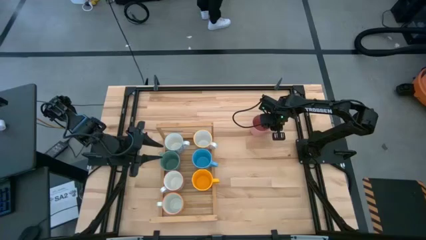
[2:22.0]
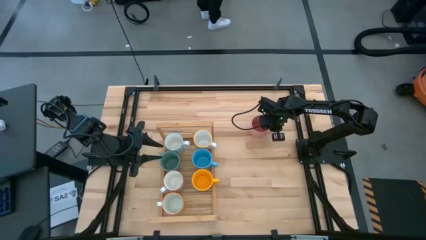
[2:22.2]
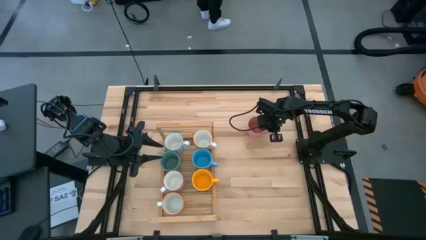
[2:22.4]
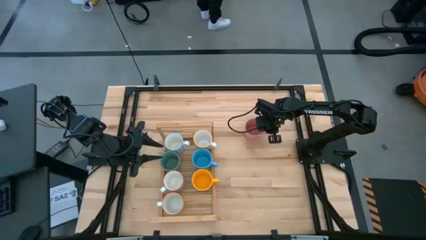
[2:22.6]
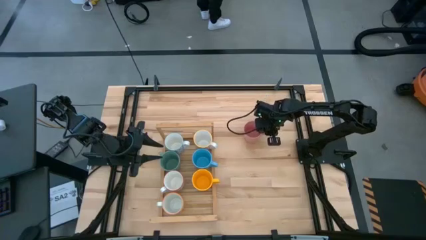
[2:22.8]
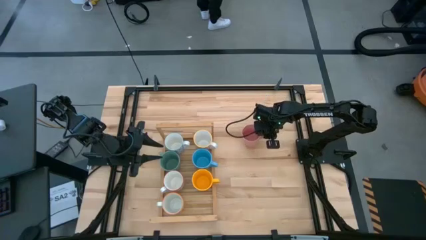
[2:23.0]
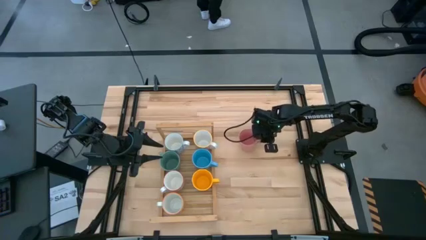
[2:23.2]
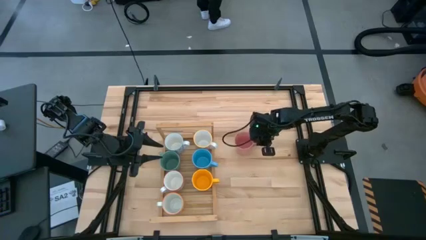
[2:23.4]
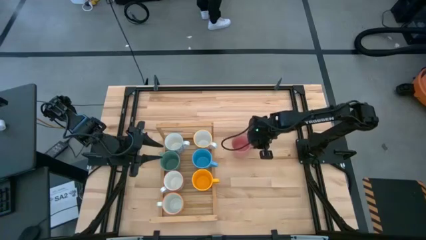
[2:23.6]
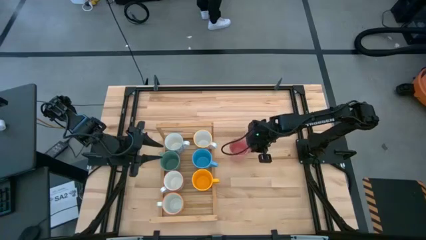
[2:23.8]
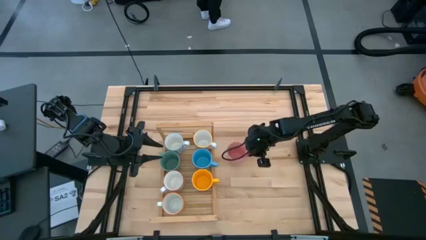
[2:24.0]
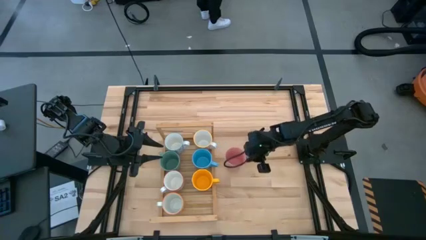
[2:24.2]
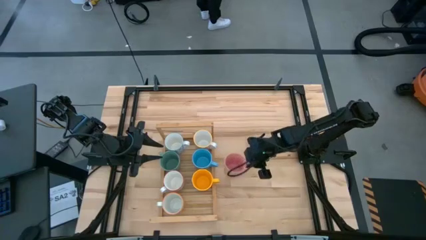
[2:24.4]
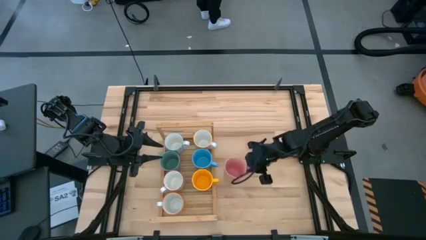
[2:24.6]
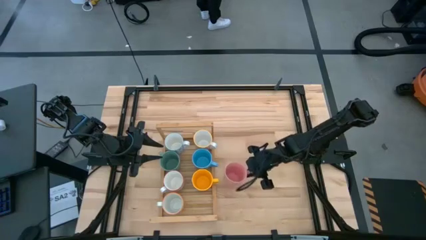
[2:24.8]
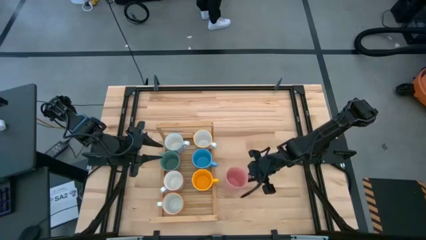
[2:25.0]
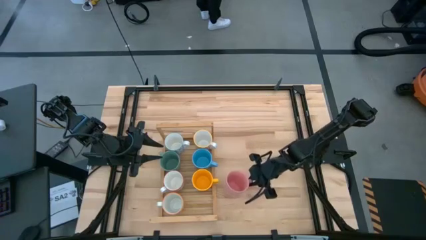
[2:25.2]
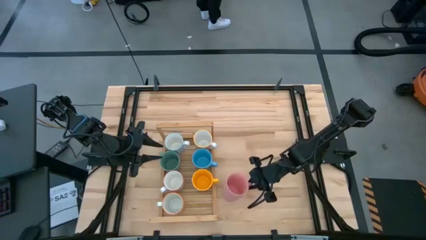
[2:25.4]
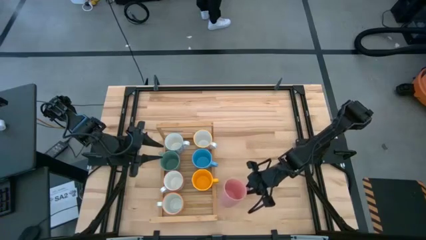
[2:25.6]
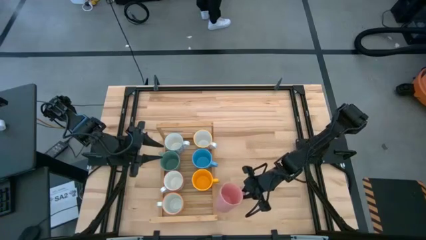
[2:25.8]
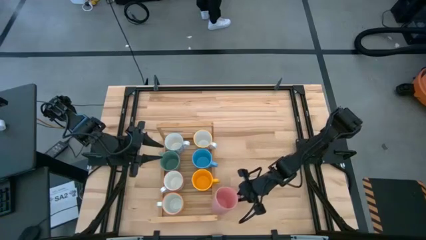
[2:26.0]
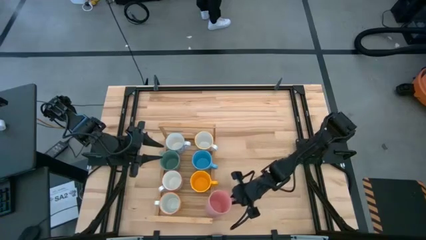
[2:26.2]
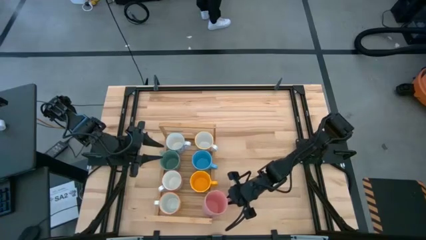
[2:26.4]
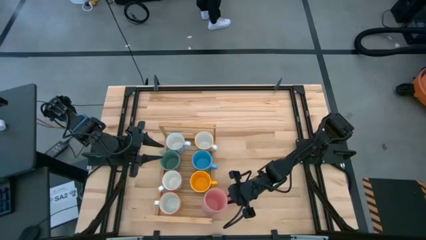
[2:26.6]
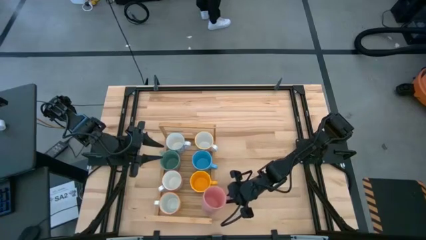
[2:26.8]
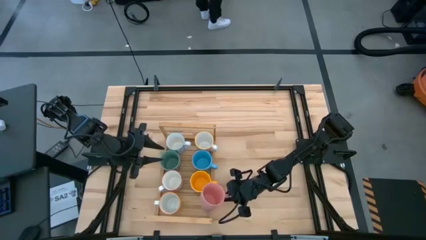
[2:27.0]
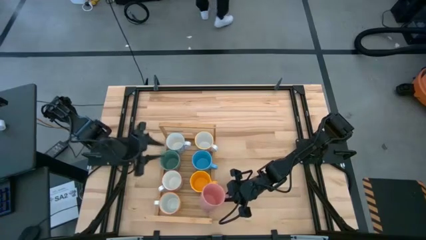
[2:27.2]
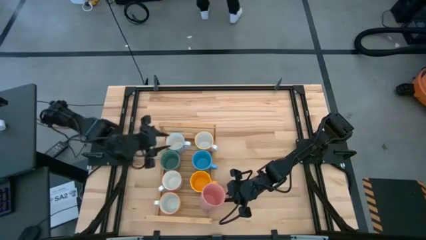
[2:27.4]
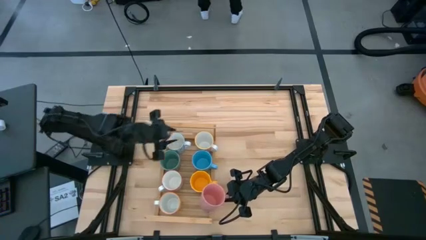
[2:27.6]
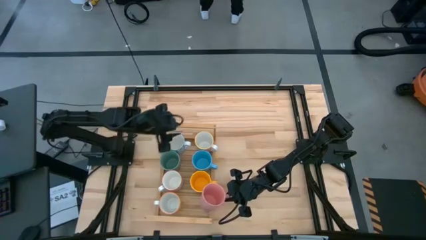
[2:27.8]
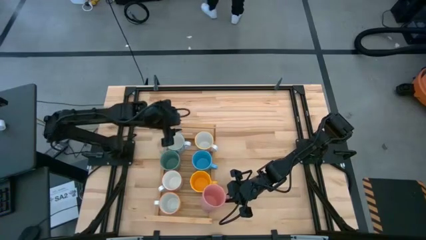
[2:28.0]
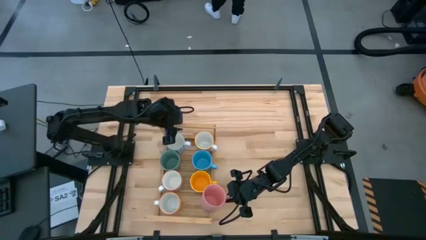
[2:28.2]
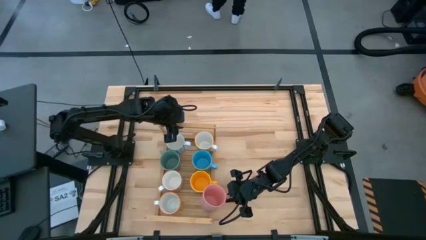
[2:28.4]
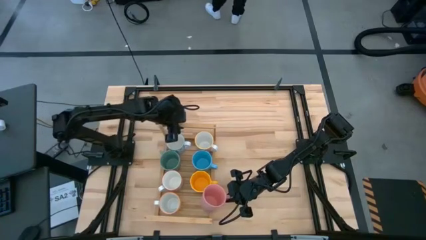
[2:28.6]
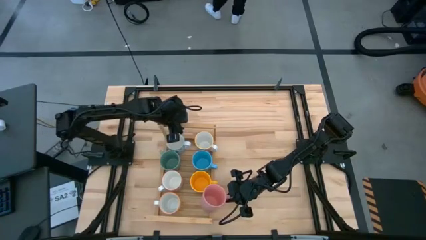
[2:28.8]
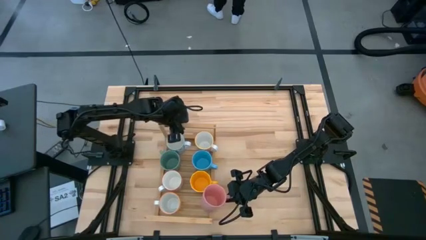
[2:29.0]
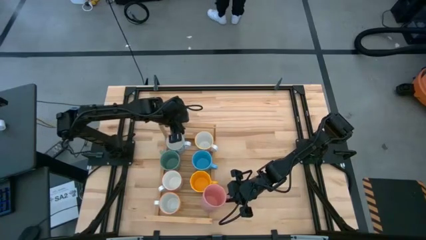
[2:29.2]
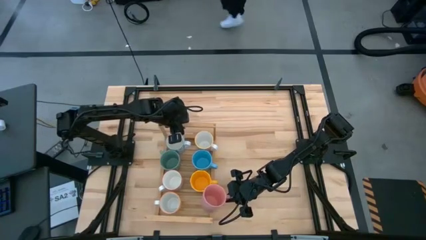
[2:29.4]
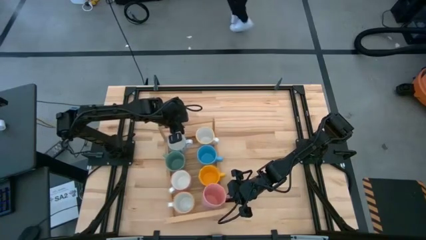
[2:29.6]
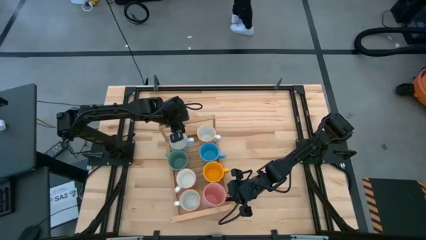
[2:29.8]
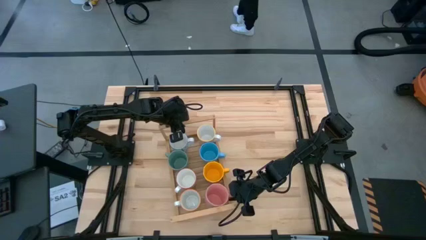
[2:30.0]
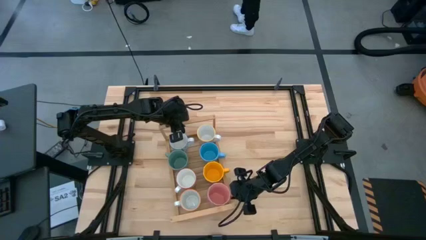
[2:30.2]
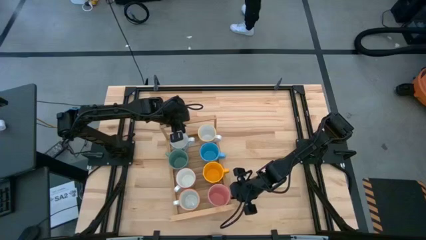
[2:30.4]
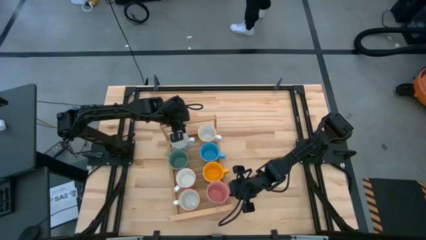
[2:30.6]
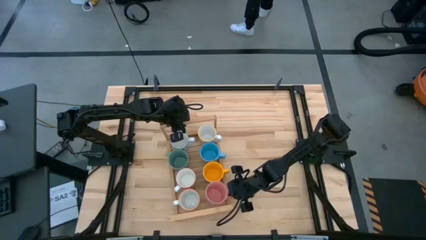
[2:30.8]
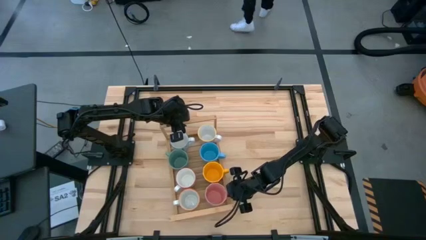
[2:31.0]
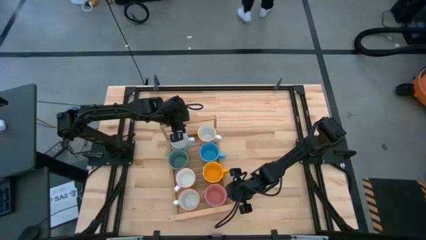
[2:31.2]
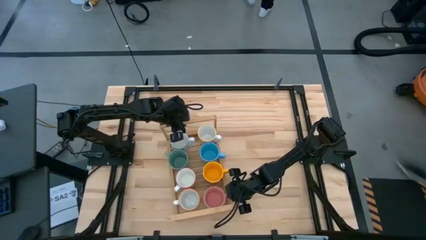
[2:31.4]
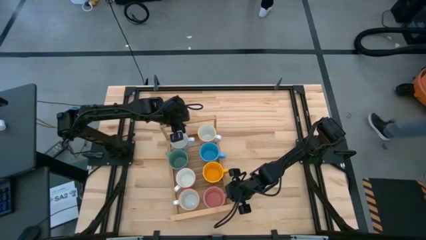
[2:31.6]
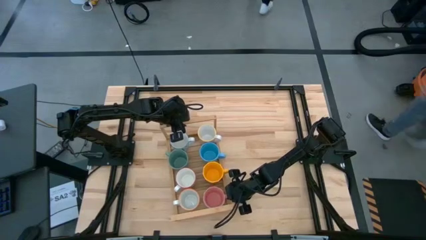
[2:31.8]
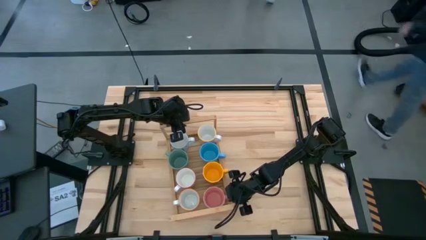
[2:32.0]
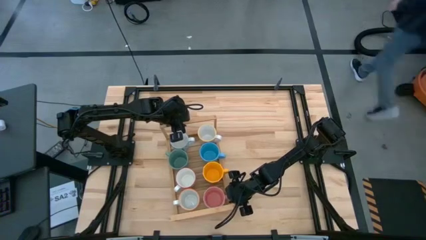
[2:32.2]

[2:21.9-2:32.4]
Task: Place coffee mugs
Put the pink mug on the shelf aligned with the yellow and white mug

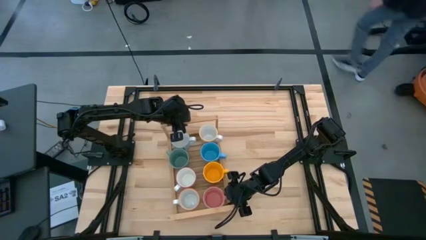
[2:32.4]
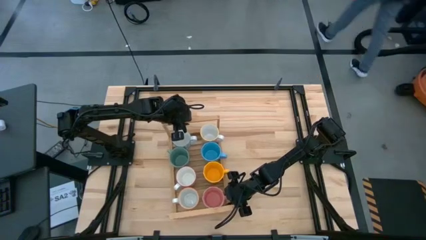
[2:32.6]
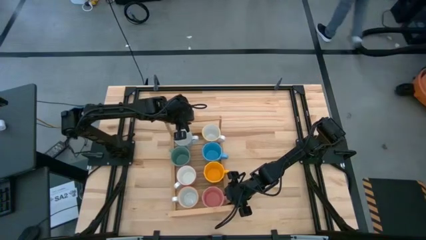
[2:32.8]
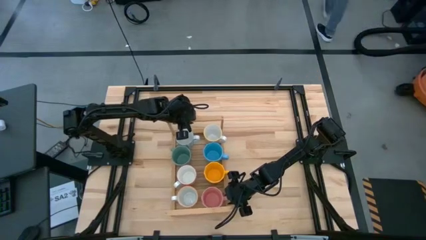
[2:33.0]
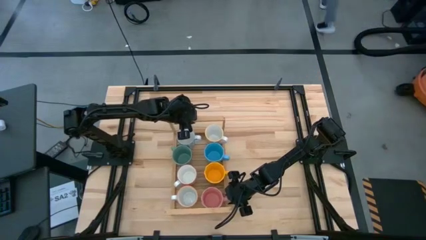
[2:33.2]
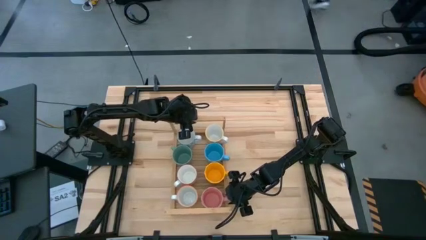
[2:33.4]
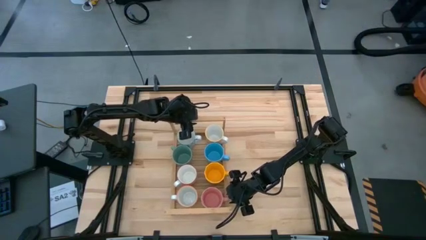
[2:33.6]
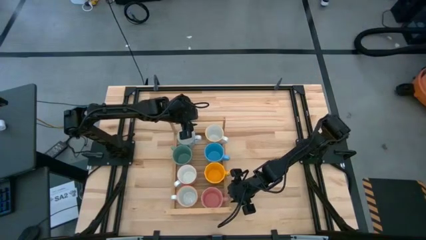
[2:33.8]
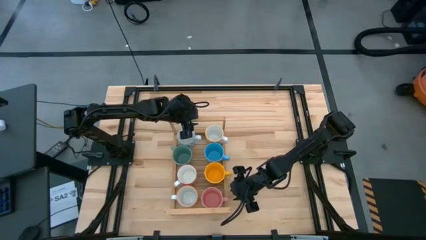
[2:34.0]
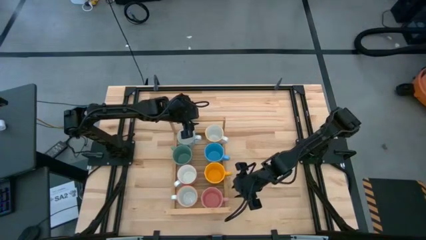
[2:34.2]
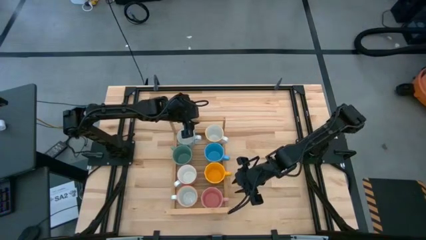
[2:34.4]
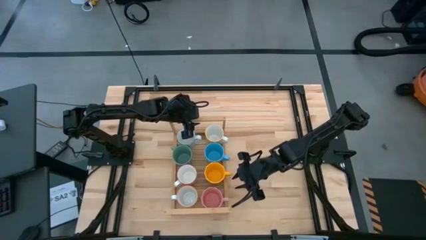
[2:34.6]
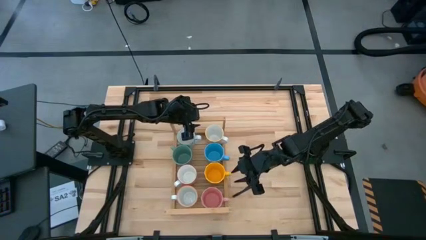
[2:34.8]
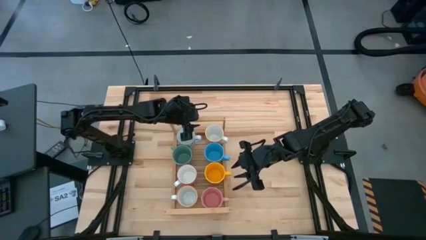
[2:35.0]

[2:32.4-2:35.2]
Adjust the shelf

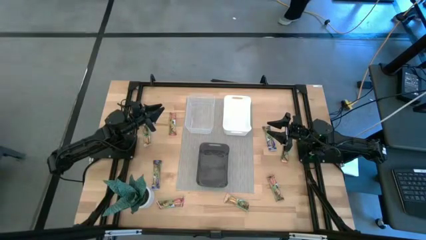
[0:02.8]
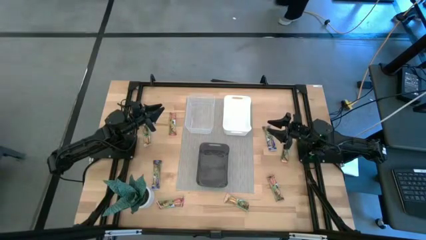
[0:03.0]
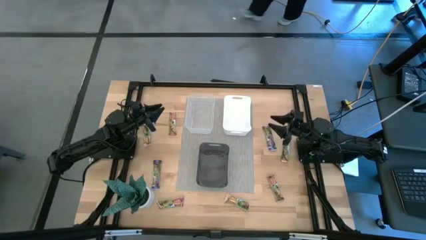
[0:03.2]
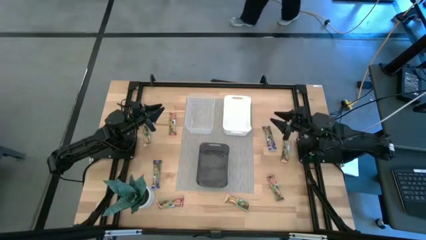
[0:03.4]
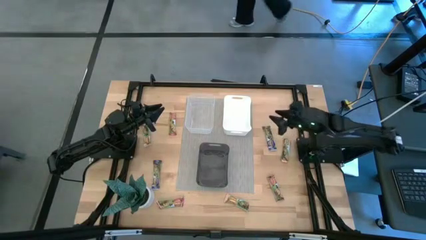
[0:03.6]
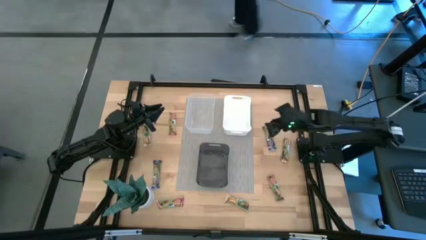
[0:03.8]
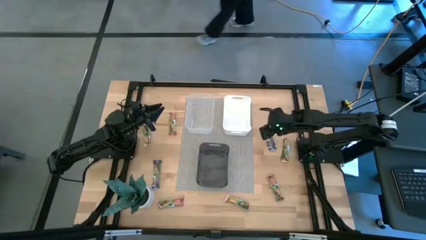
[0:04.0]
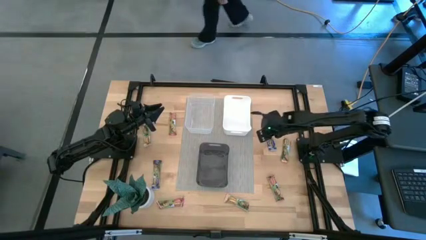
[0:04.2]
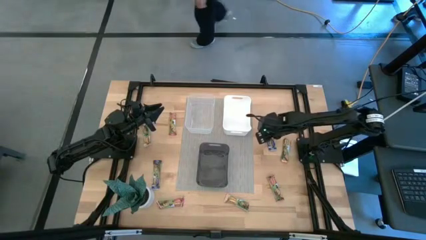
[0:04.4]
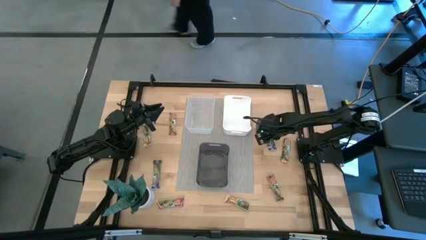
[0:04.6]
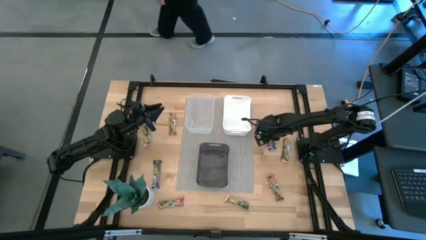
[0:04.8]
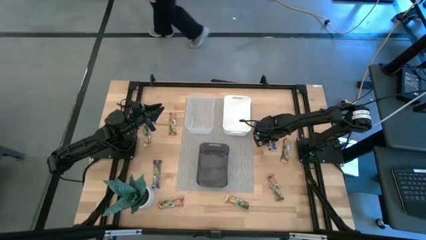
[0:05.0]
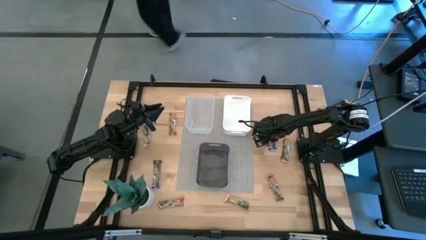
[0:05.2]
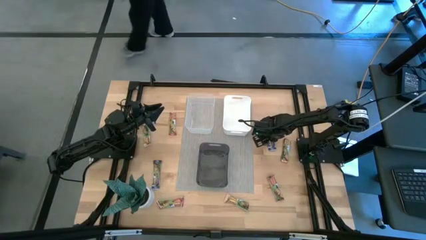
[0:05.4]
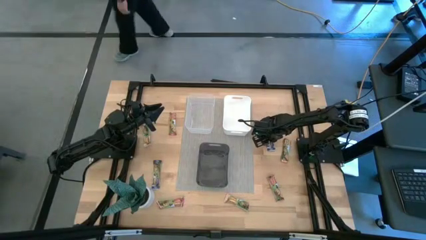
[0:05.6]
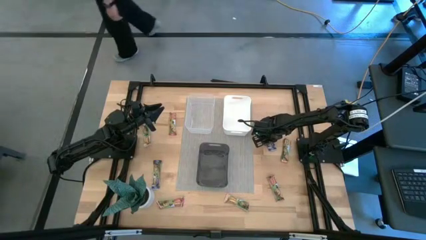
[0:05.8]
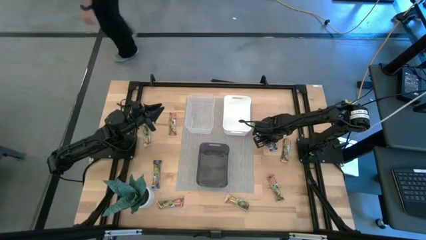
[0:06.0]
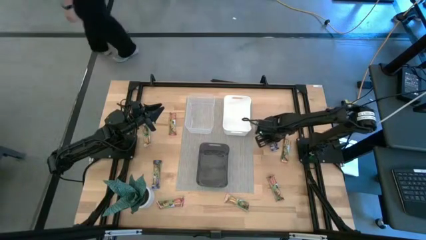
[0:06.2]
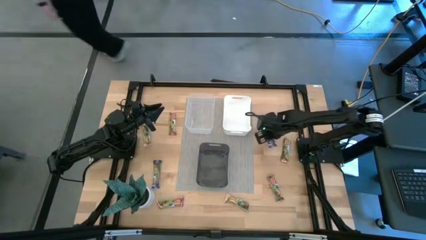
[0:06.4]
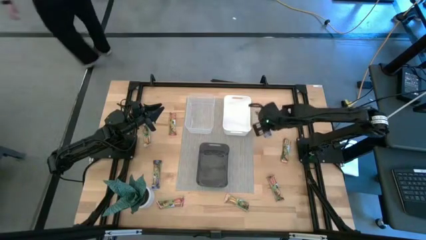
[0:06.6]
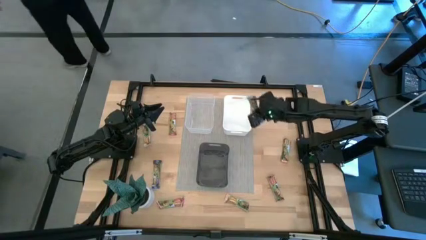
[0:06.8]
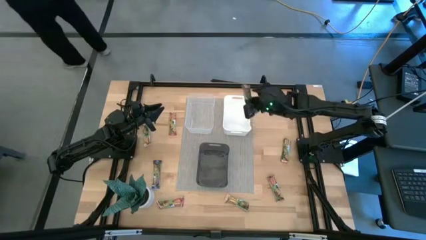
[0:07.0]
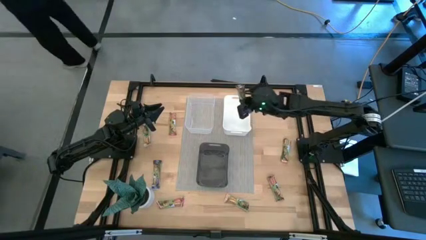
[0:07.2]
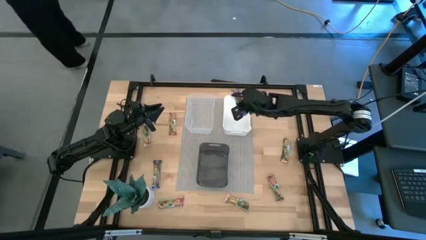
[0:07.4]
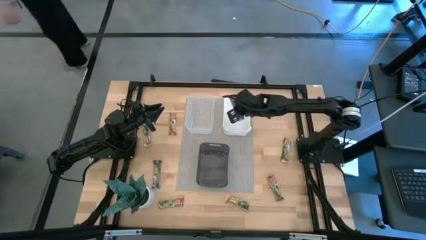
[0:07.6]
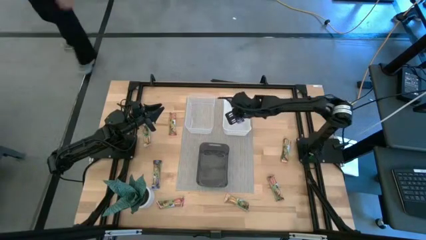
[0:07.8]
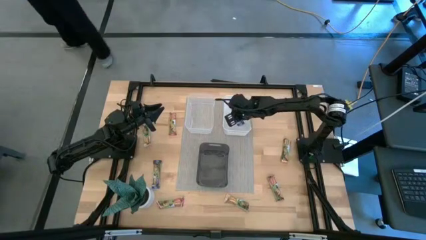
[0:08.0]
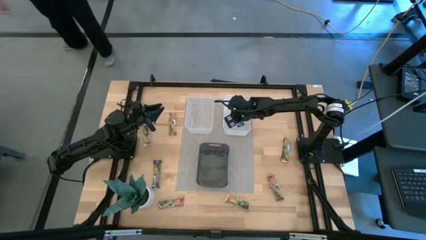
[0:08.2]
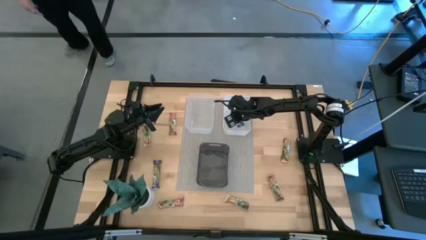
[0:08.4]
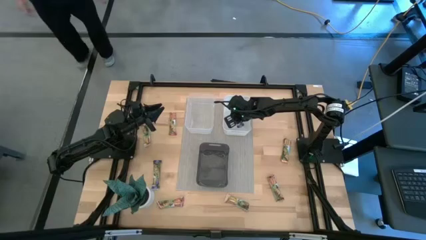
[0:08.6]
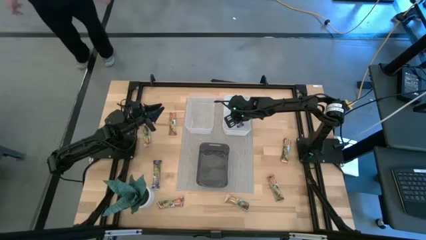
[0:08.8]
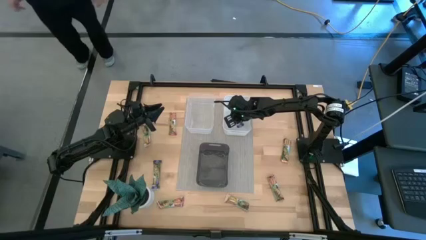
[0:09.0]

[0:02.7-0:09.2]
Task: Pick and place Granola Bars by type
Put the right blue granola bar into the white bin
